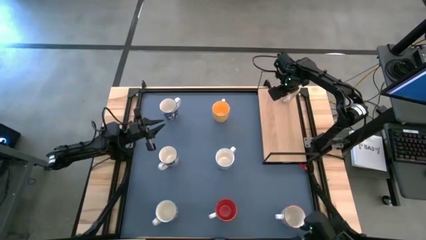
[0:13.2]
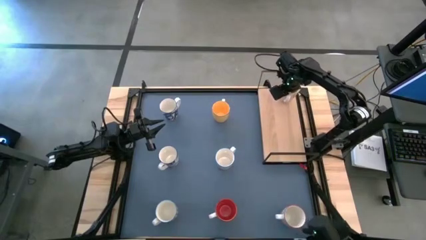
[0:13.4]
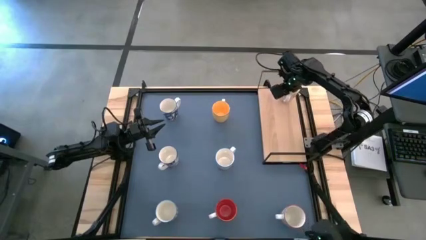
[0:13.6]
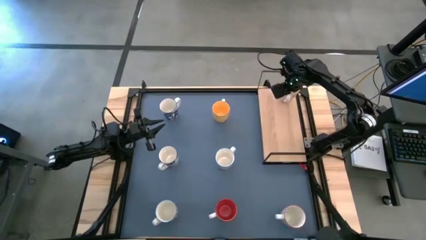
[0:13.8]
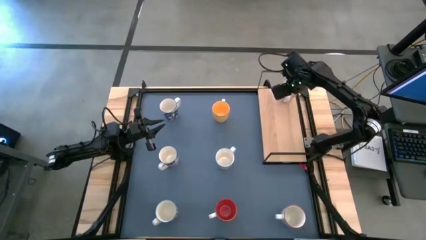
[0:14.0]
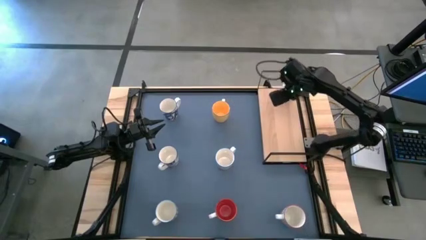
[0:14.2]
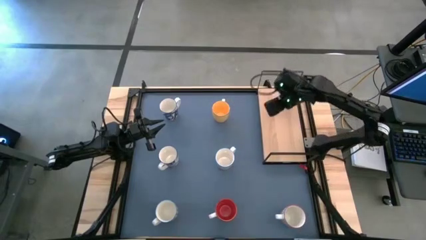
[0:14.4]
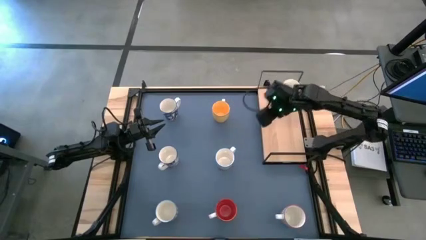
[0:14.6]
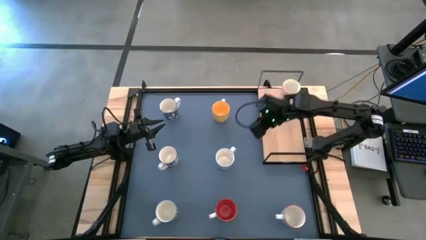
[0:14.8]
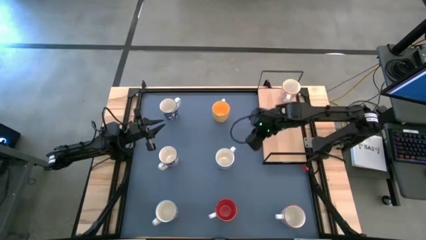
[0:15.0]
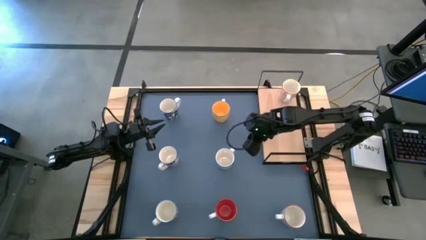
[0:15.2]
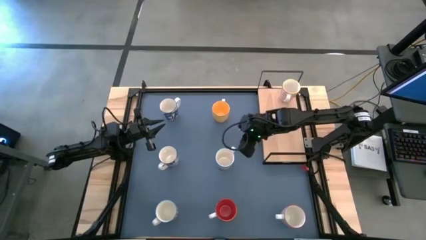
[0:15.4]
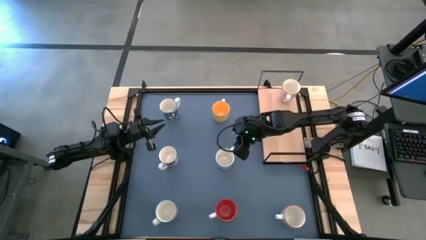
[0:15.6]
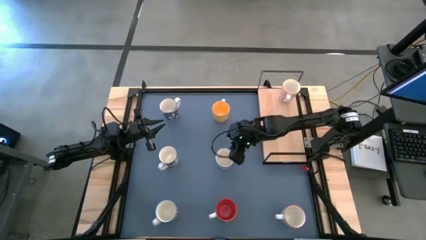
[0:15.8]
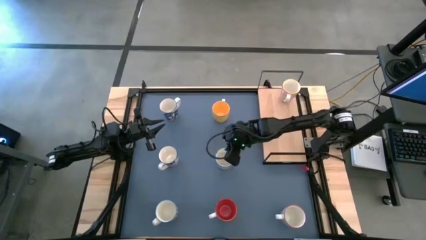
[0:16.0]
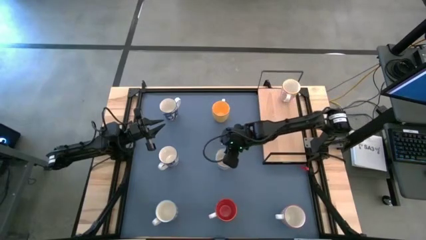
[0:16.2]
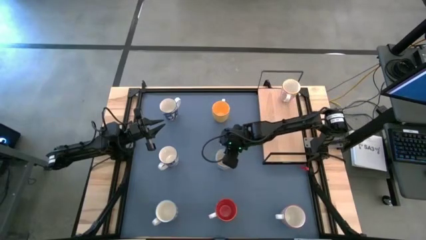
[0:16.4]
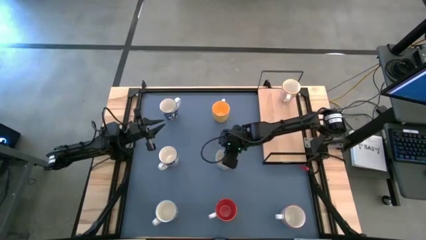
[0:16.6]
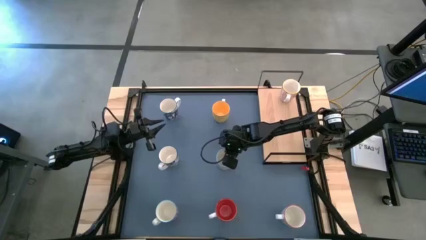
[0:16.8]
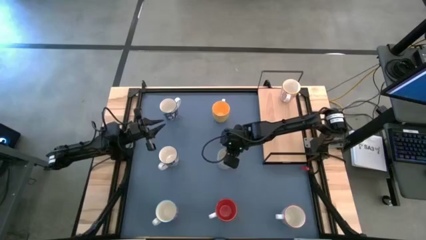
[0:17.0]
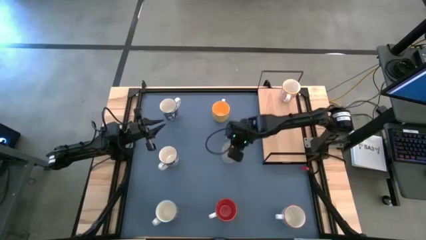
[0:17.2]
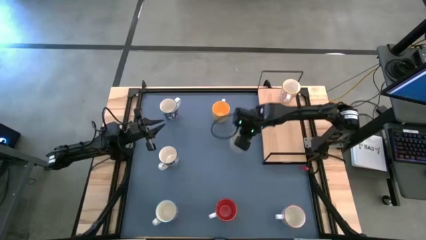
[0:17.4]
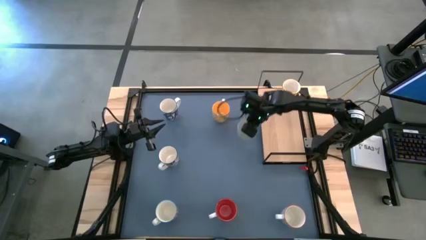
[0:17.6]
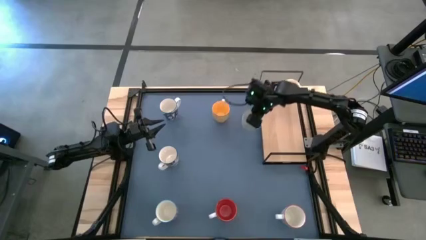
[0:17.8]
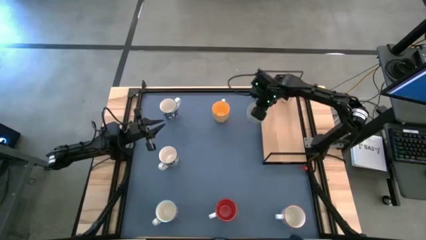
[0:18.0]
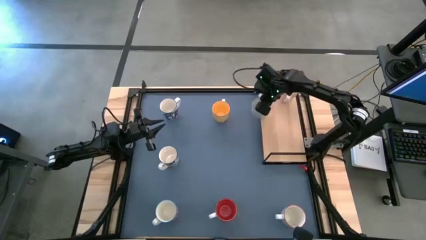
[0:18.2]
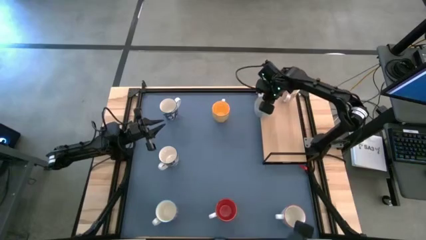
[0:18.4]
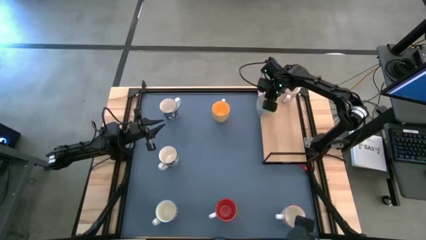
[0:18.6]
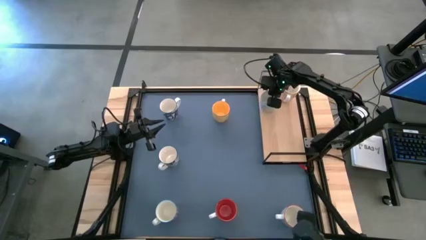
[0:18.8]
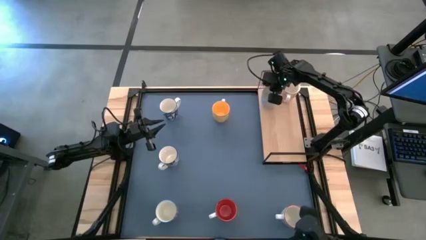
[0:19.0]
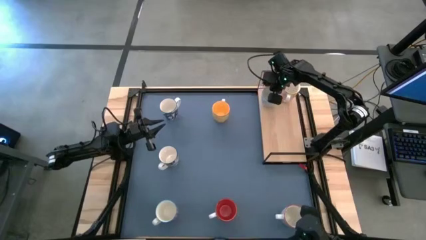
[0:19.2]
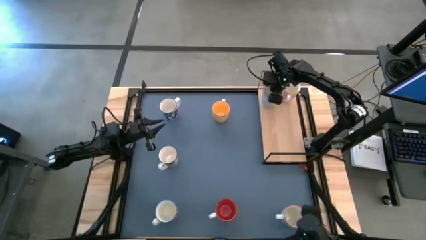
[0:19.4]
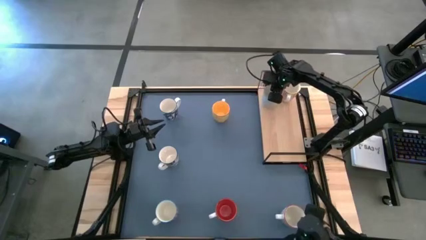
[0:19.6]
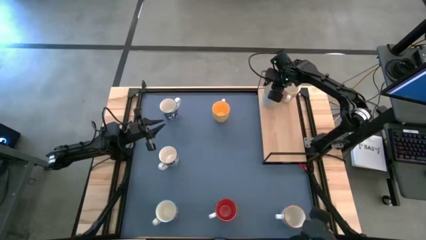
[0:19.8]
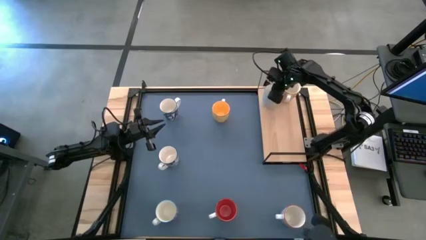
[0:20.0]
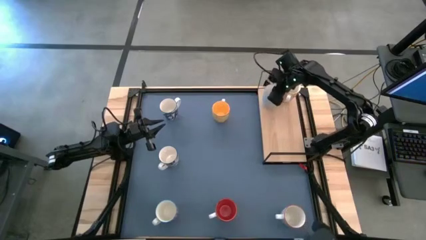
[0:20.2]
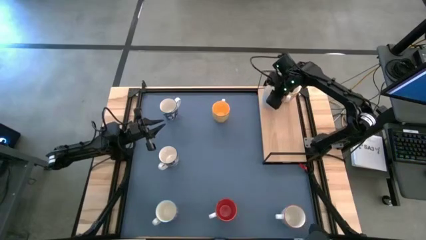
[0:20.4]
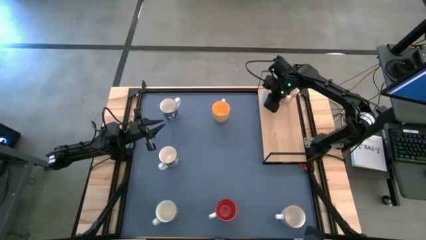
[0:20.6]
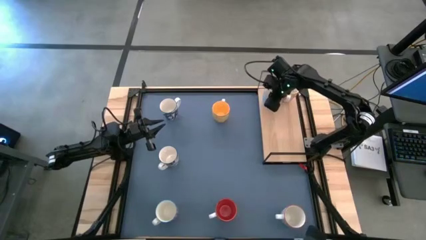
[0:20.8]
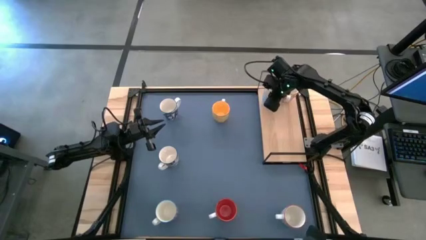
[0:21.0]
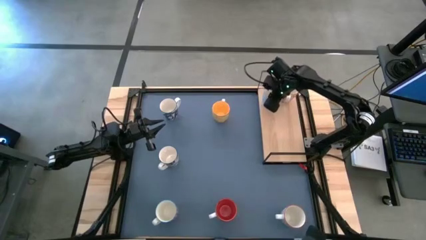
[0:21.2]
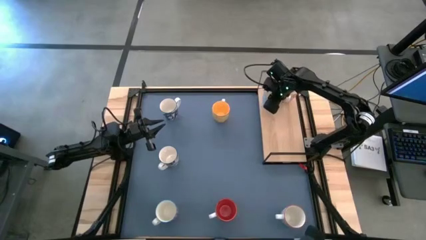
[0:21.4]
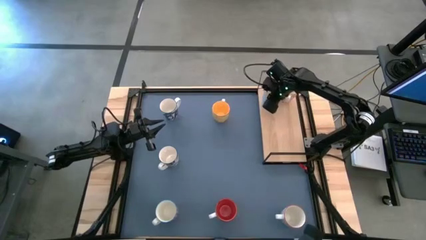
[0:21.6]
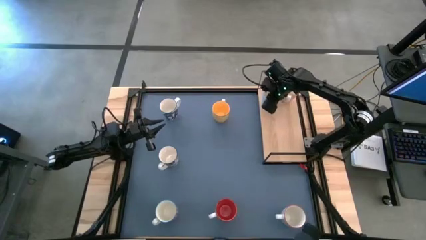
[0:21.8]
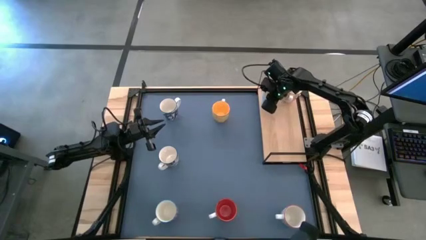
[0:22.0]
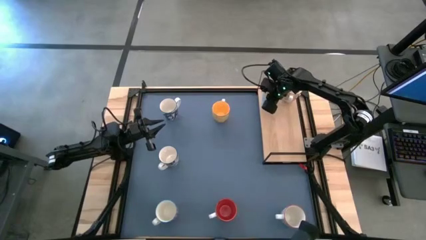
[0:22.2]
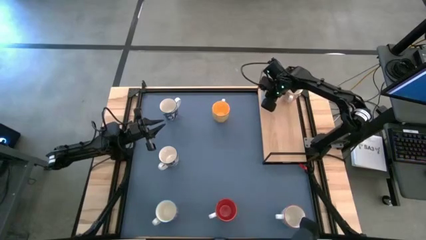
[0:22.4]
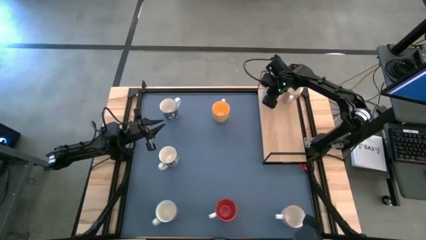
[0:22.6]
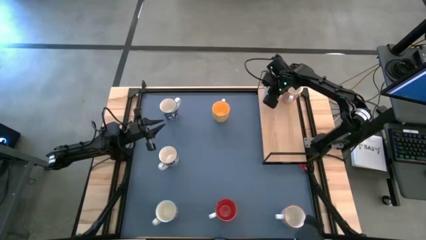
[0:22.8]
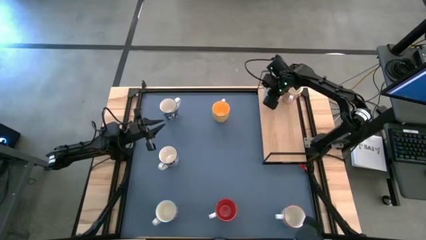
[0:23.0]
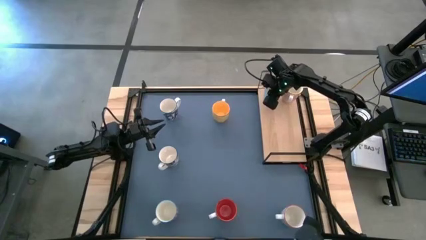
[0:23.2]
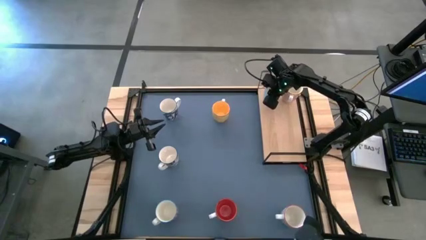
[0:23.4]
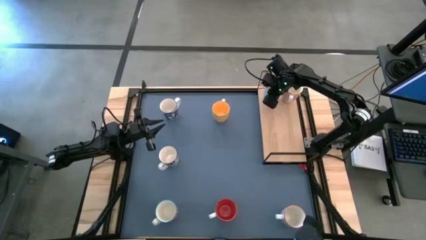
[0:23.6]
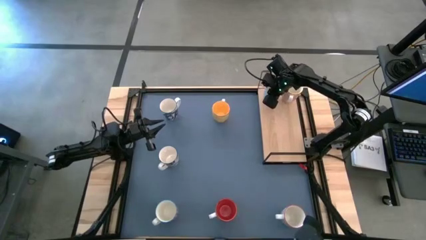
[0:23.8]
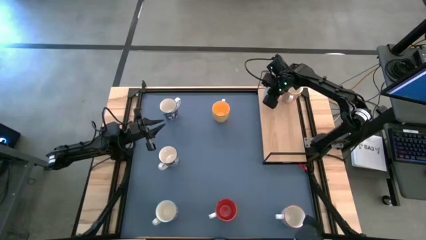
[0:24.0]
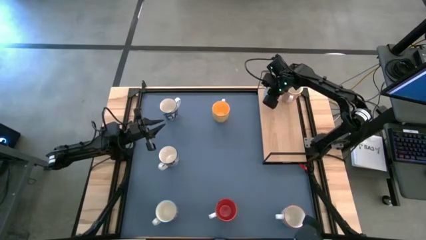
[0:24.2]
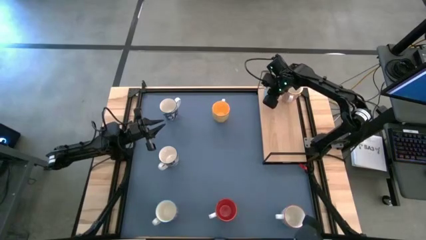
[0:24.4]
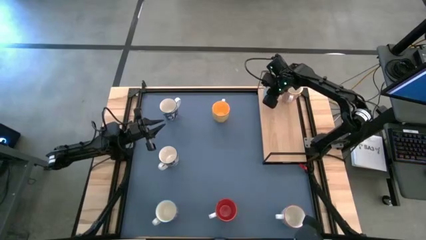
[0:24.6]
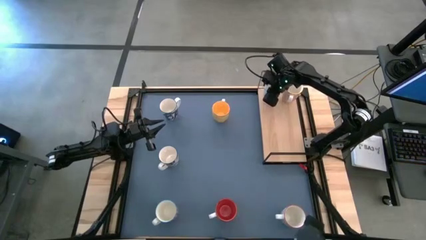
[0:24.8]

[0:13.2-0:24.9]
Task: Place coffee mugs
Put the light blue cup on the shelf aligned with the orange cup

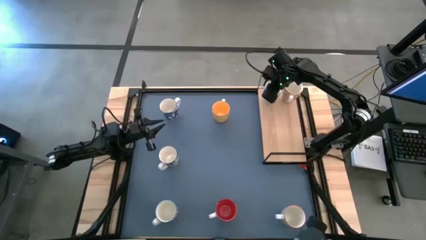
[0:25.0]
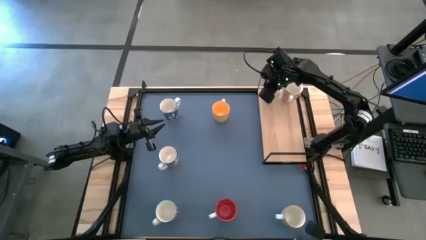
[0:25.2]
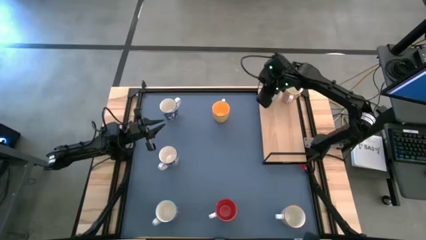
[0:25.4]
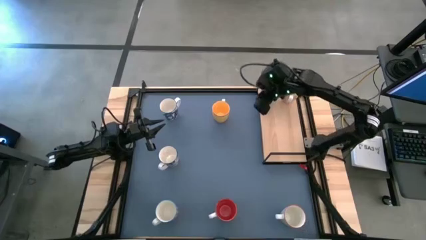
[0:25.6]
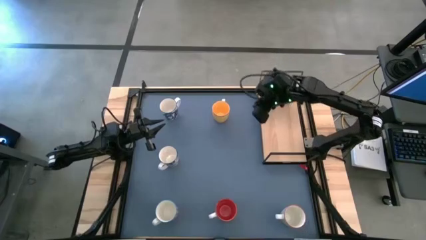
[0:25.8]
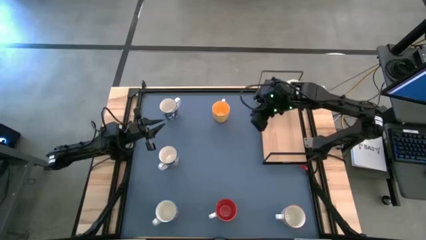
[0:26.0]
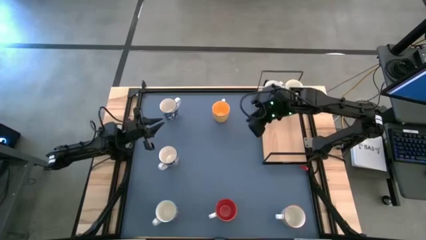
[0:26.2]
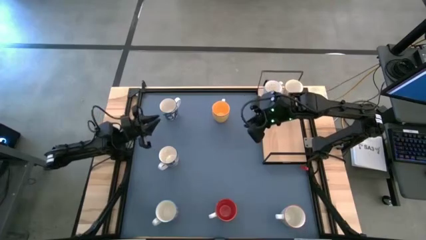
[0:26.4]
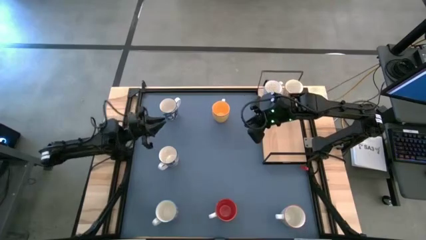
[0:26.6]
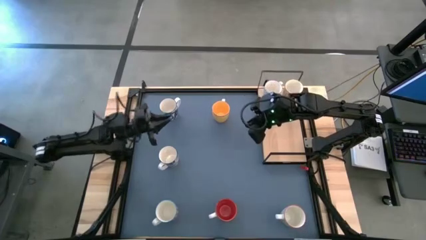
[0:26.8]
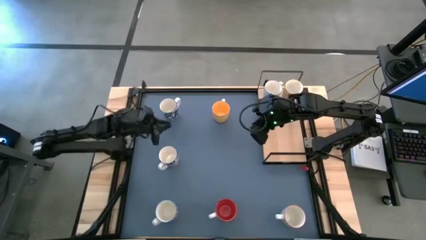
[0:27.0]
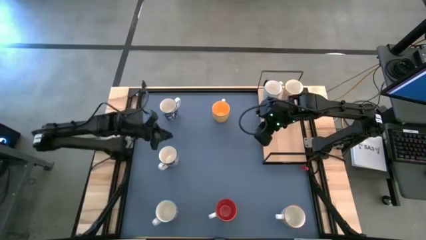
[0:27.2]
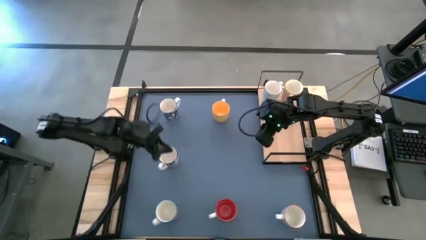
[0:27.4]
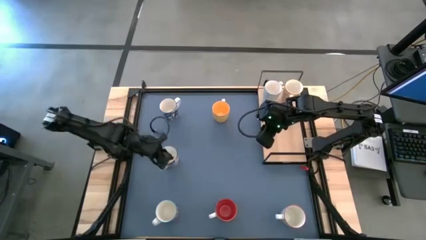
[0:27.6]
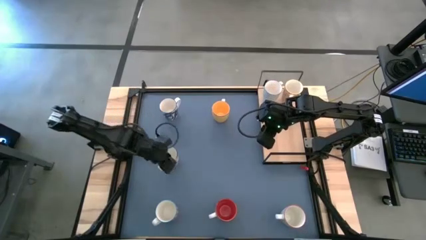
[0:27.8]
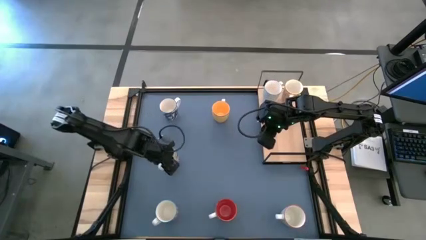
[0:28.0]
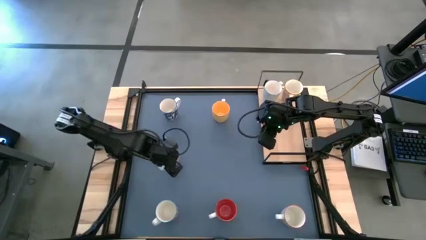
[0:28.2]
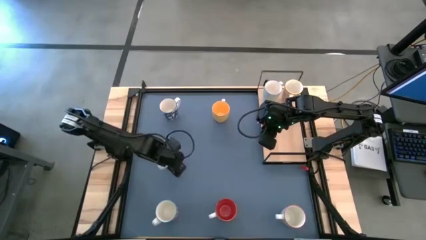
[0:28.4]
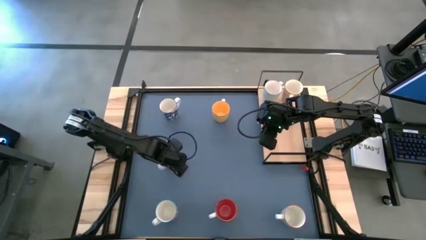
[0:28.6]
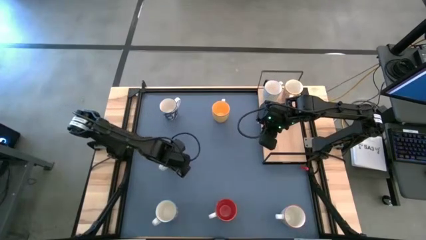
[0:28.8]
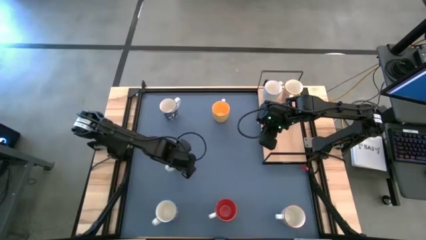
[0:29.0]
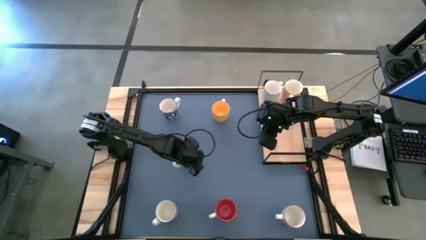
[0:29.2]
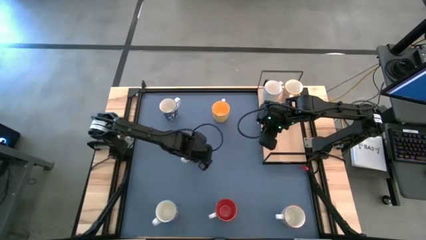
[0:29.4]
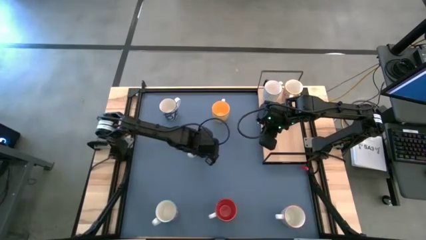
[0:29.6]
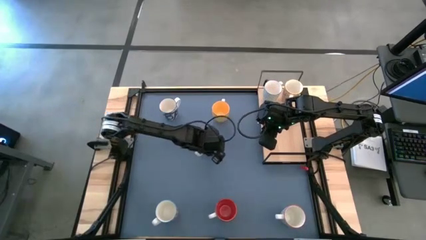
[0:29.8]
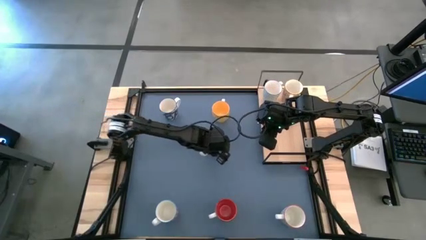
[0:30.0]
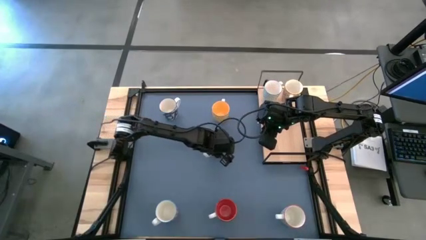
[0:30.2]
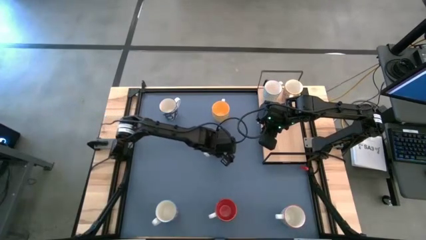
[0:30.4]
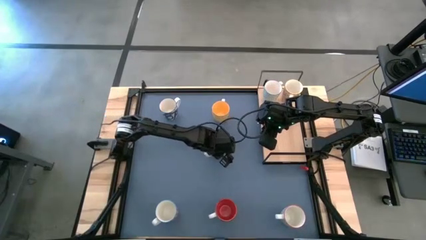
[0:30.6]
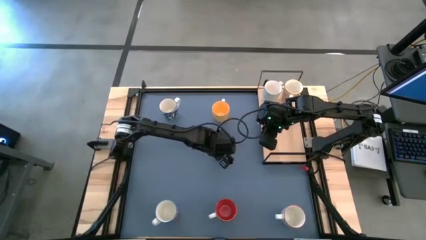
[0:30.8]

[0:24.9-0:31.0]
Move the dark blue cup to the center of the table
